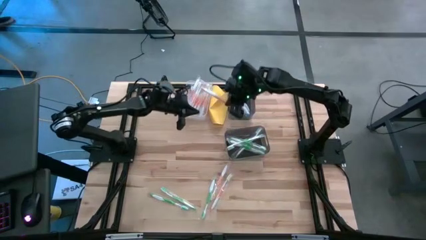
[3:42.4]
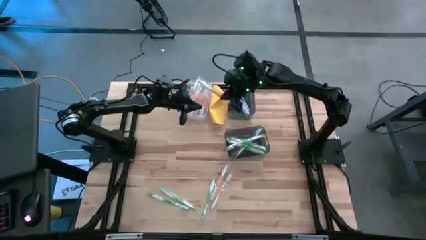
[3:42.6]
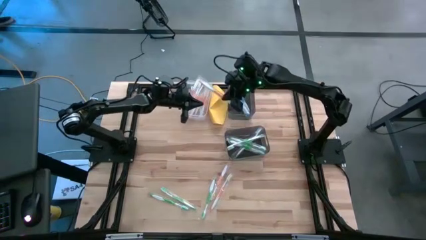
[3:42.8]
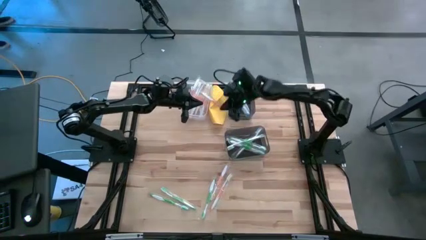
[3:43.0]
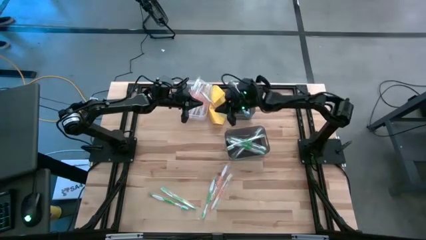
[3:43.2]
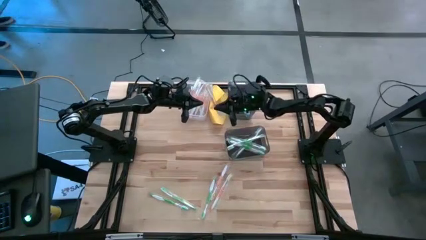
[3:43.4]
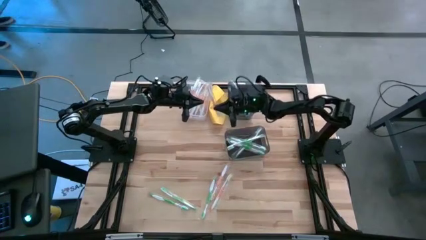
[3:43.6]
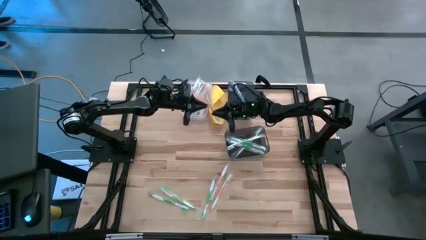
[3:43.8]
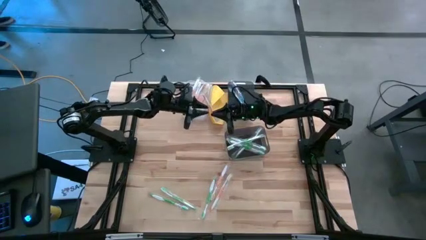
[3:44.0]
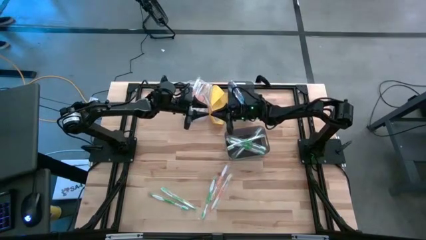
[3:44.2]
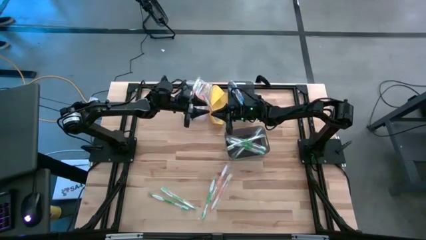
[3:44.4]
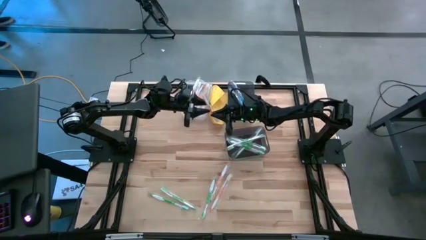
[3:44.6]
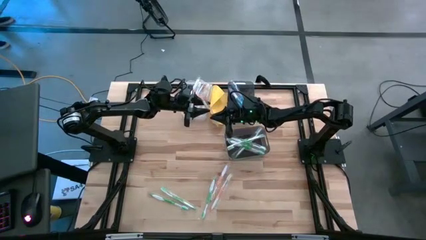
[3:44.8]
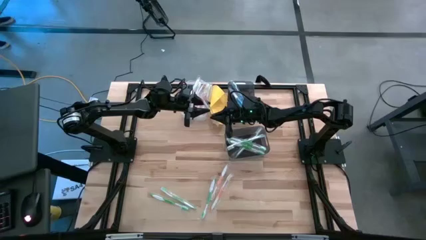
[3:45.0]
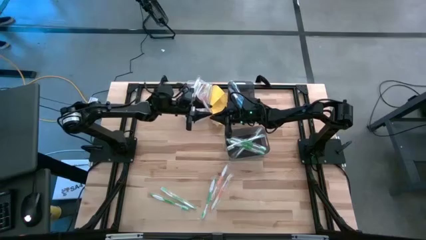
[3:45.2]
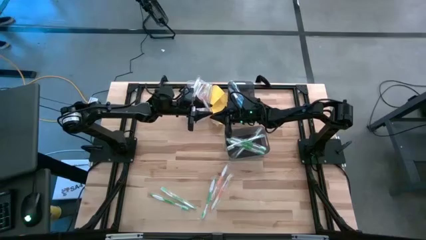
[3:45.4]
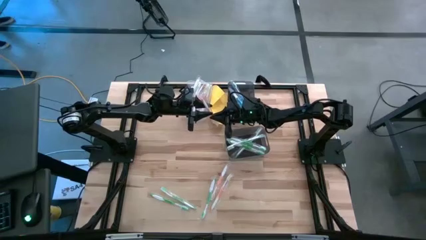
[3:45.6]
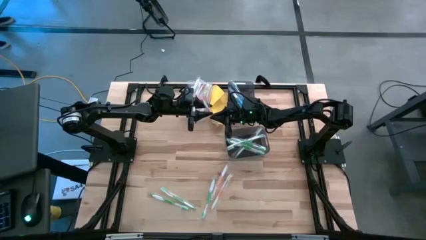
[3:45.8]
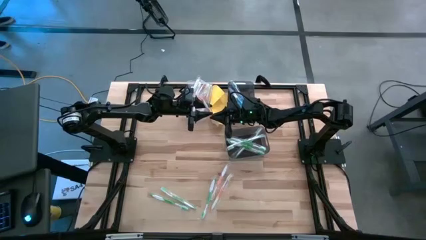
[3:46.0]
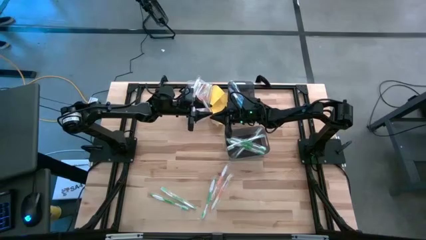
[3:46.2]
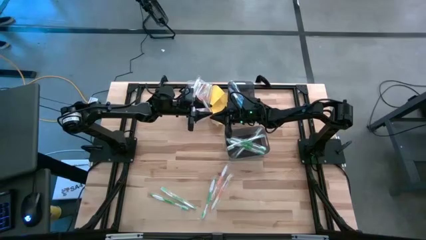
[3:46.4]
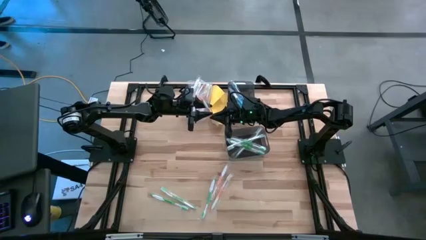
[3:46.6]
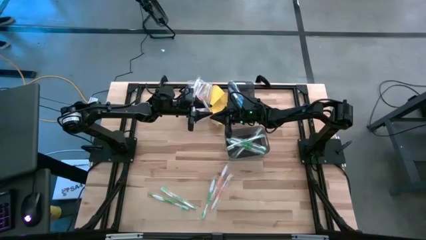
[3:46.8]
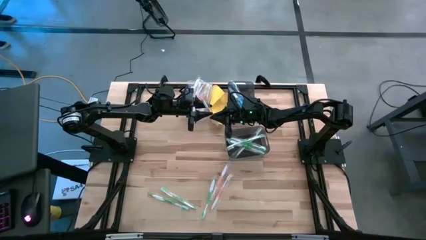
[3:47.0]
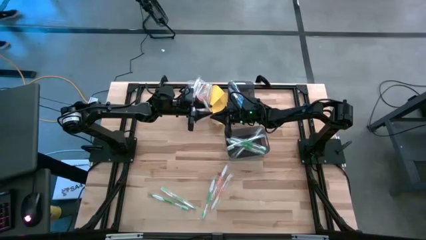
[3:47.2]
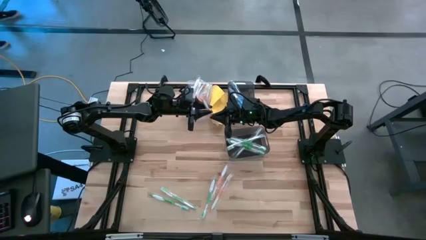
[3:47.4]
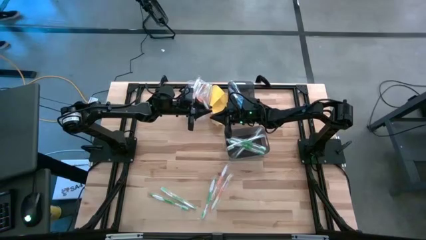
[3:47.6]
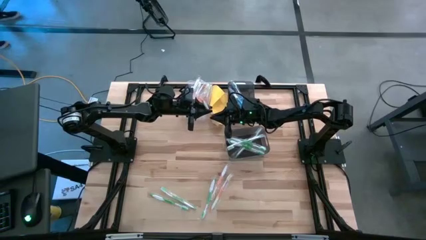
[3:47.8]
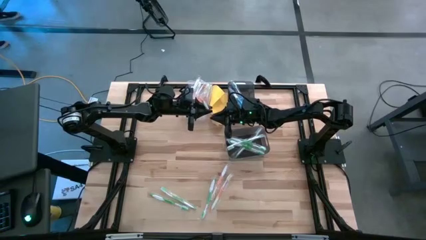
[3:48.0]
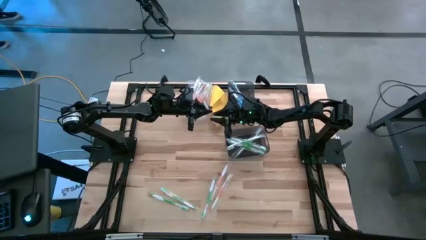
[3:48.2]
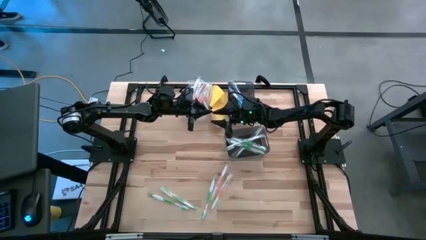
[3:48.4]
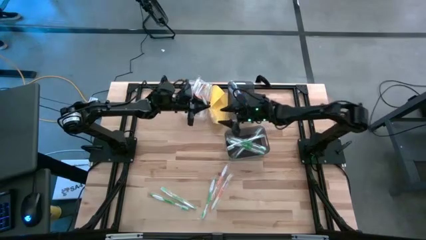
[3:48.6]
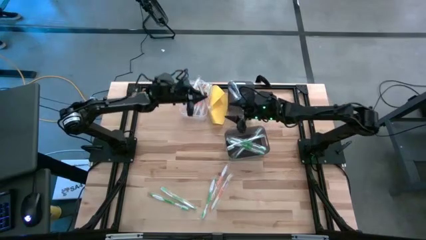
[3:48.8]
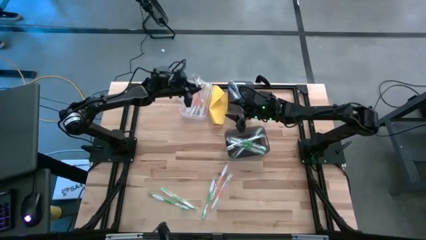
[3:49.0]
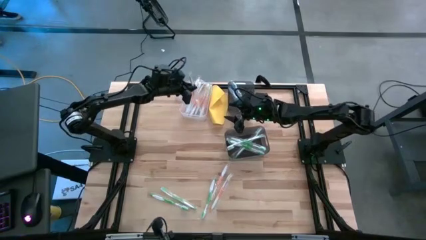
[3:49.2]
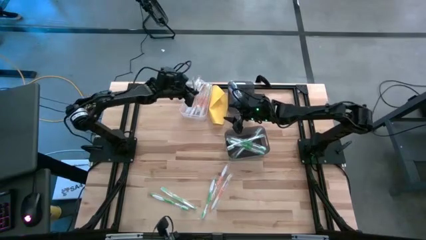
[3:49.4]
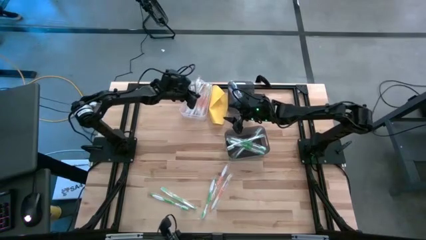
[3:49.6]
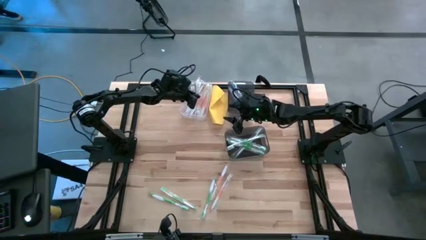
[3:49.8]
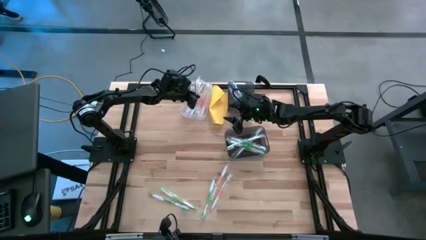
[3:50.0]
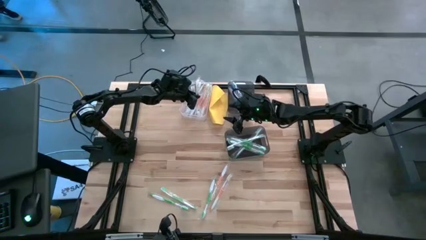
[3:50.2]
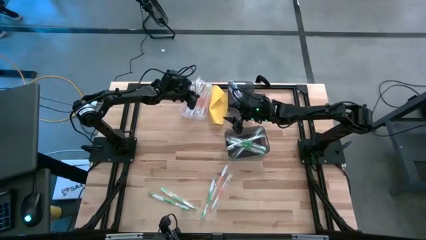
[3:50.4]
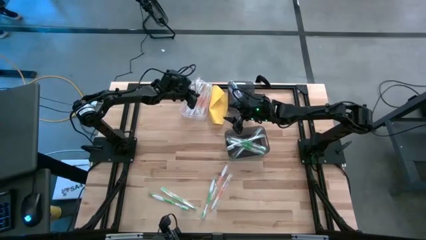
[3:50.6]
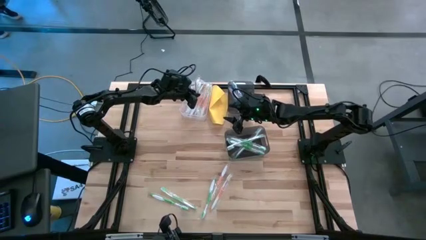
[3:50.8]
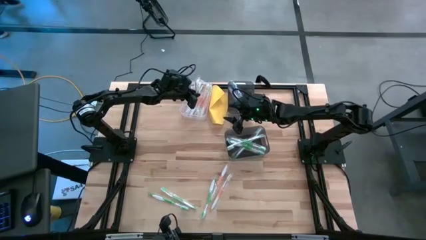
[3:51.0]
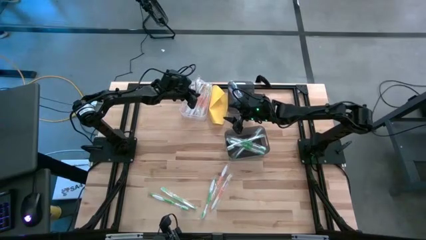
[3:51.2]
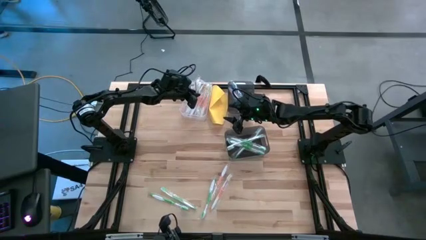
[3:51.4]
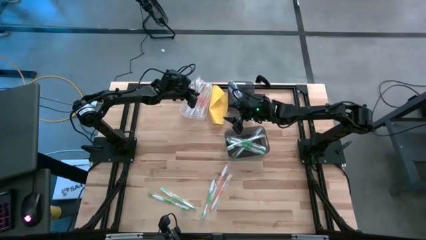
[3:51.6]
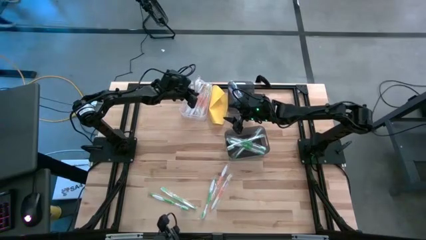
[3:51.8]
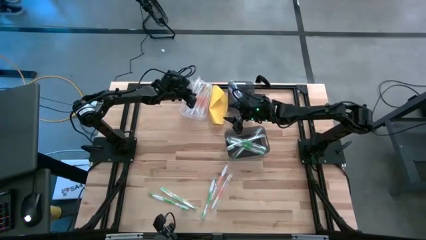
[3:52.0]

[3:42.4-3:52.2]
Task: Pick & Place Toothbrushes
Put the orange toothbrush into the transparent bin

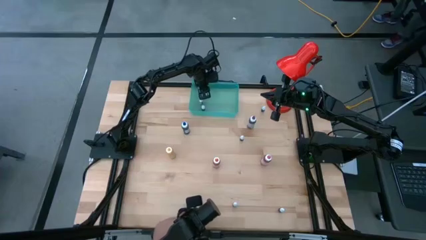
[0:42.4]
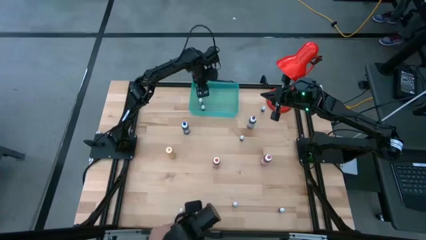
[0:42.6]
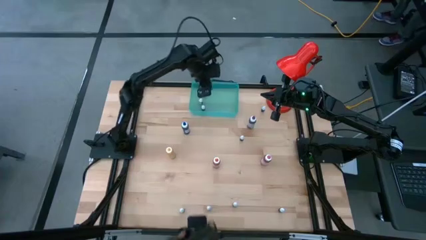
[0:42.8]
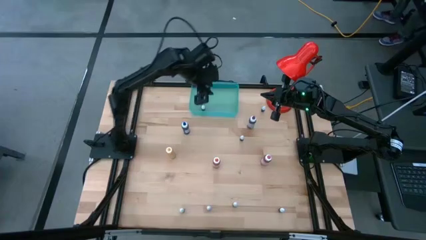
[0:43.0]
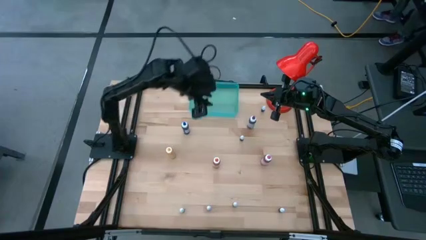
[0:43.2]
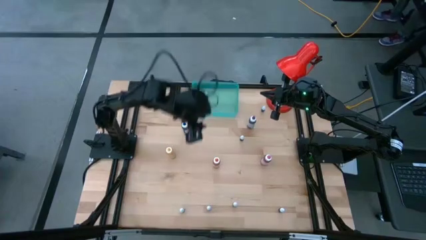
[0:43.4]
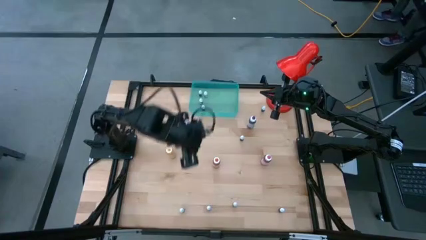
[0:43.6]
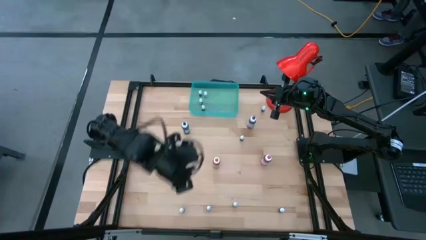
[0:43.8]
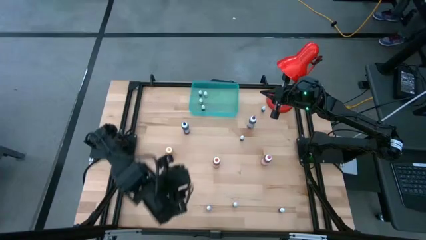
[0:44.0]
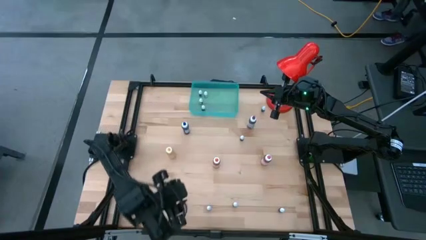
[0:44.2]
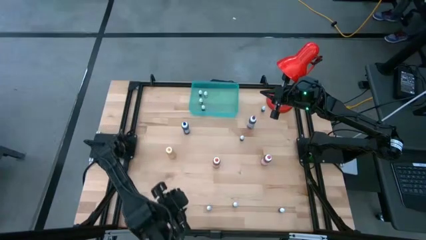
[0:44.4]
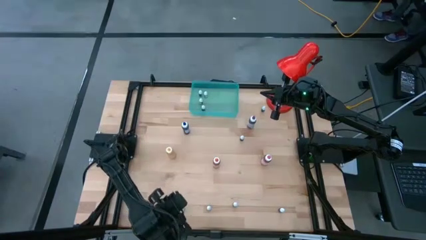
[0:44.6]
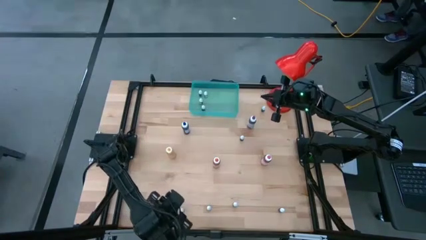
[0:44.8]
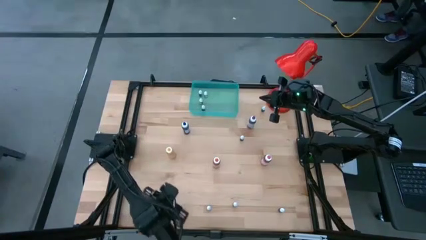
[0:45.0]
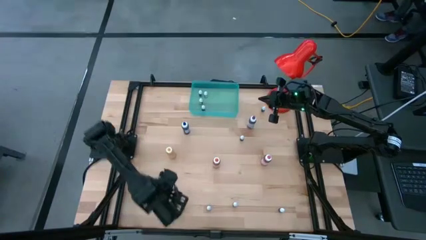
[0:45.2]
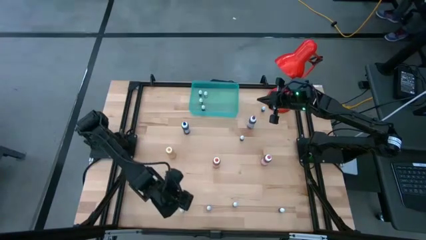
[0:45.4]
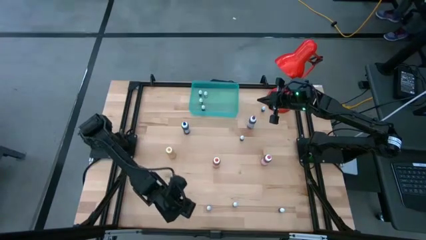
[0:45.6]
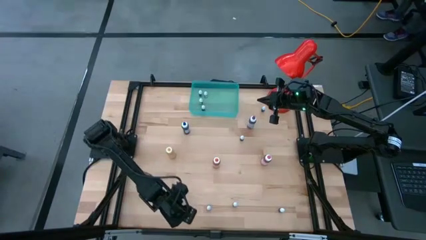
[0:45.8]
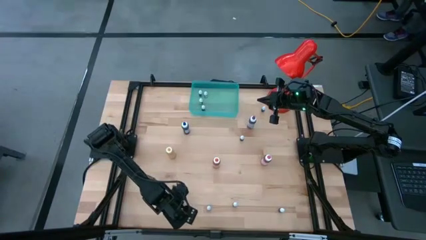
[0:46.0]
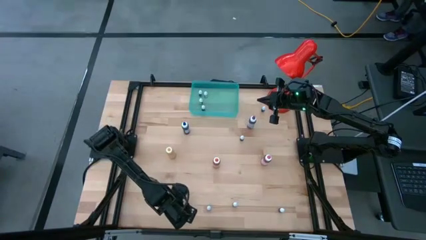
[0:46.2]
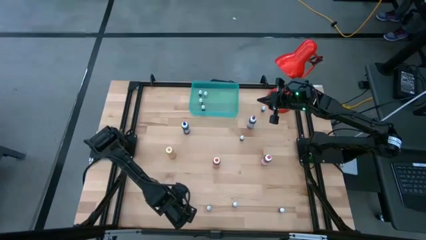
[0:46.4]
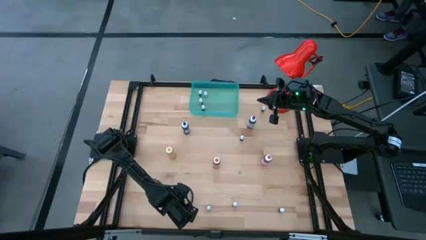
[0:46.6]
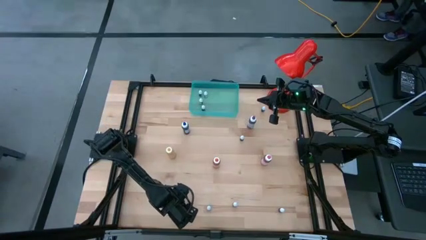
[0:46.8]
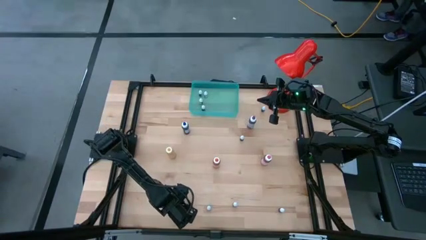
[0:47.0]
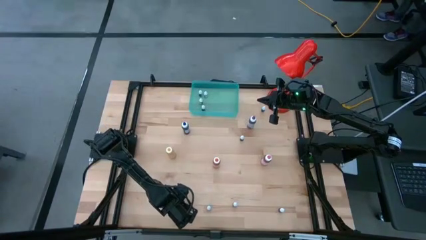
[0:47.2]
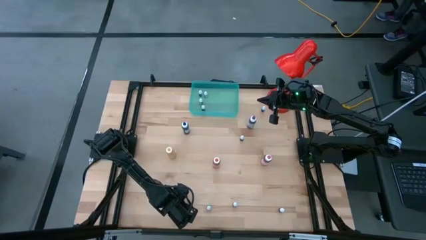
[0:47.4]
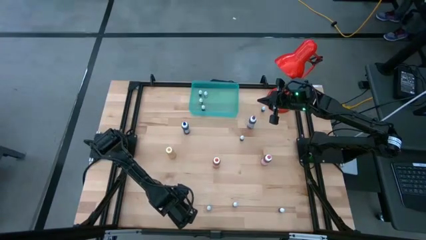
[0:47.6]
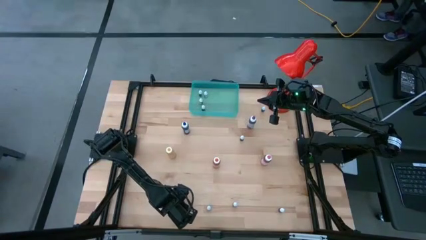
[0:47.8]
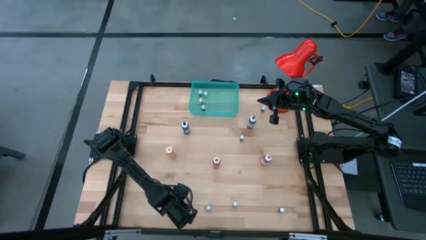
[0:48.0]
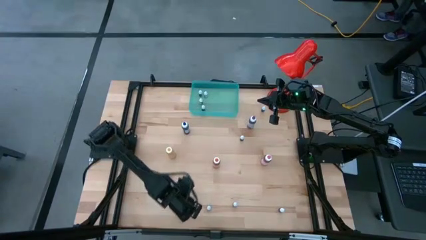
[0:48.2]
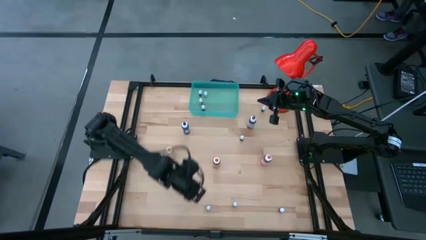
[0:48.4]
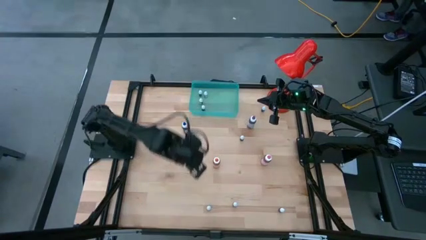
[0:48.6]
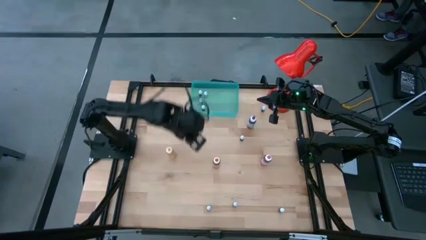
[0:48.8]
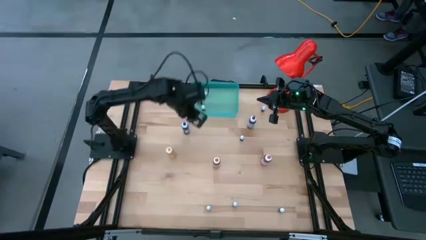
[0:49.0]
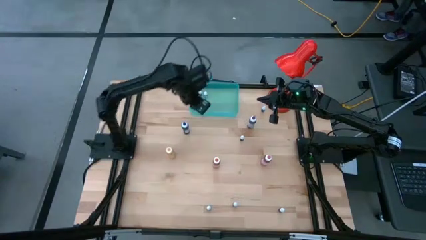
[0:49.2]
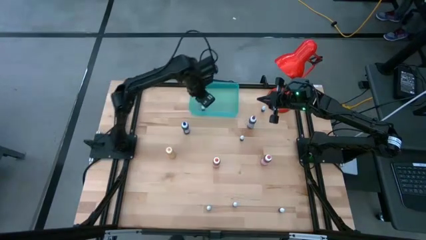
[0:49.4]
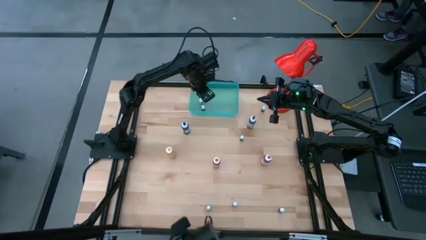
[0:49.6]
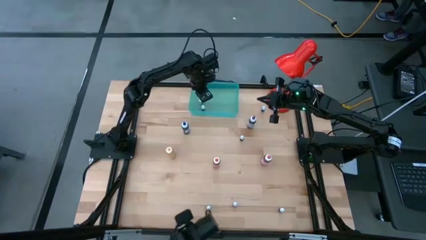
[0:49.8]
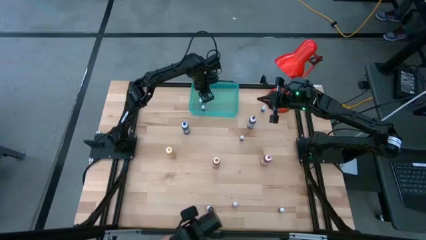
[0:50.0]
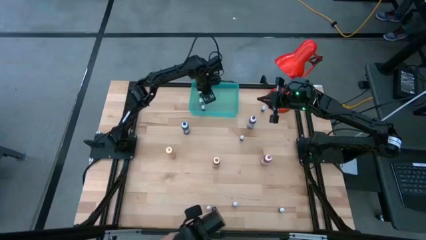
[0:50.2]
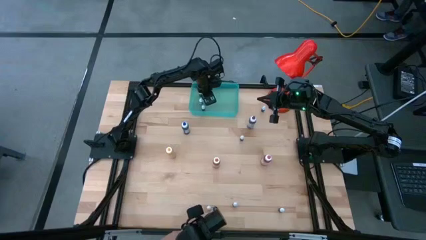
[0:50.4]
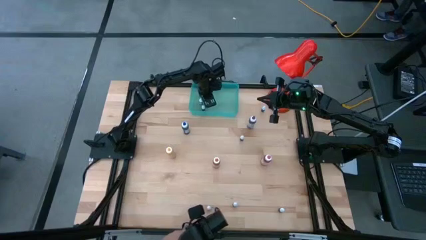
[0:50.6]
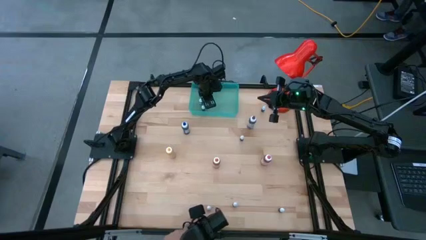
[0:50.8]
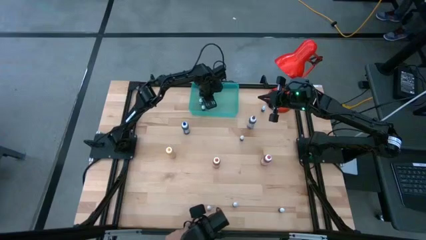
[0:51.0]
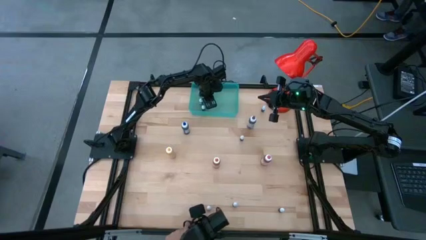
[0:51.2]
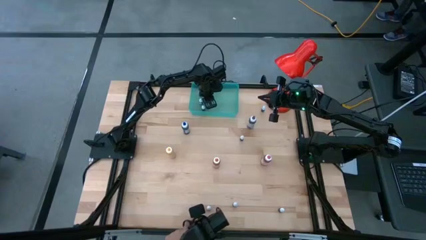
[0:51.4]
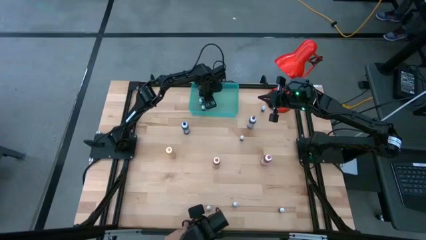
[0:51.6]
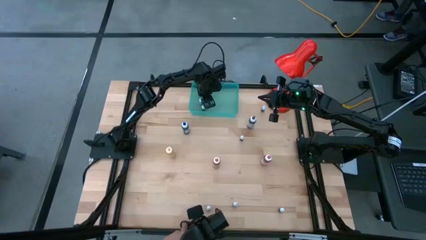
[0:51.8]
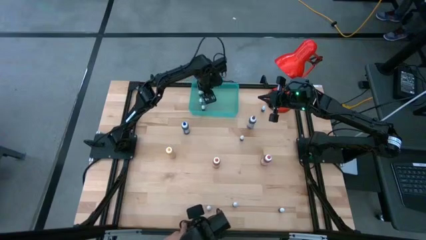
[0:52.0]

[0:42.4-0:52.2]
Task: Pick & Place food coloring
Put the bottom left blue food coloring bottle into the bin
